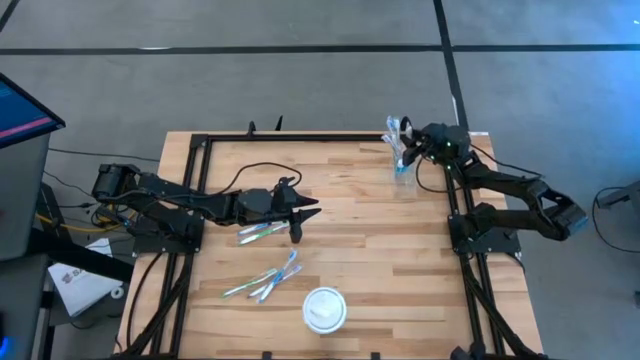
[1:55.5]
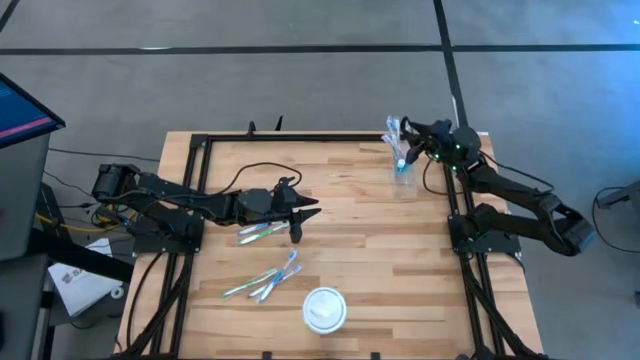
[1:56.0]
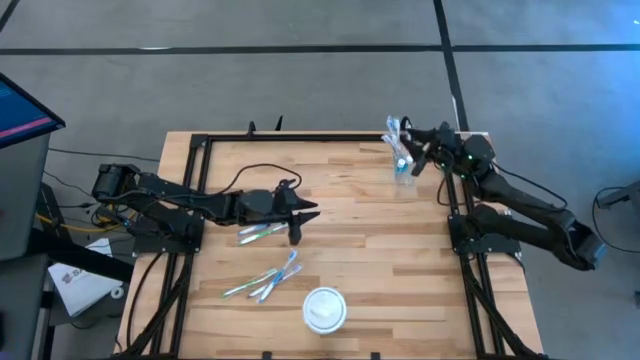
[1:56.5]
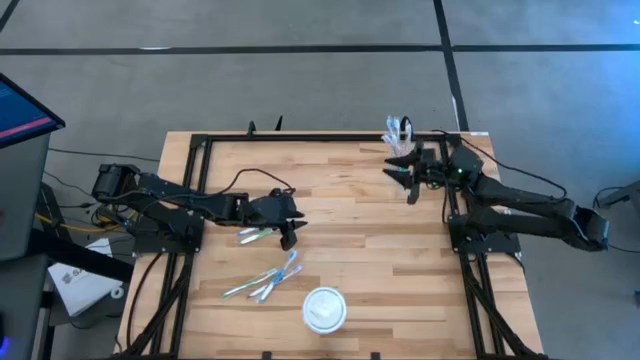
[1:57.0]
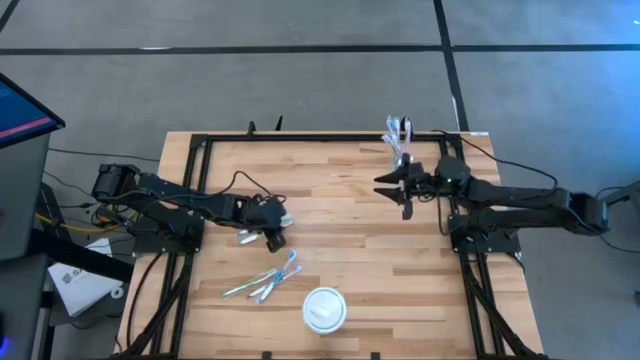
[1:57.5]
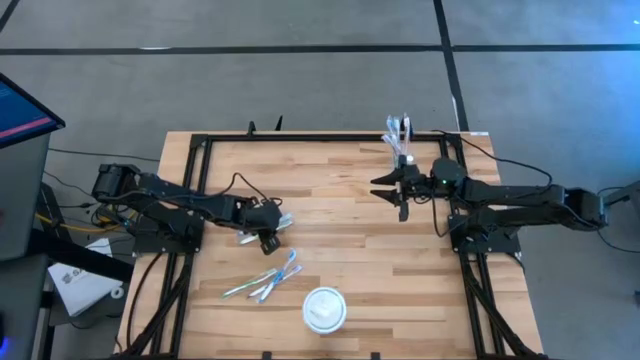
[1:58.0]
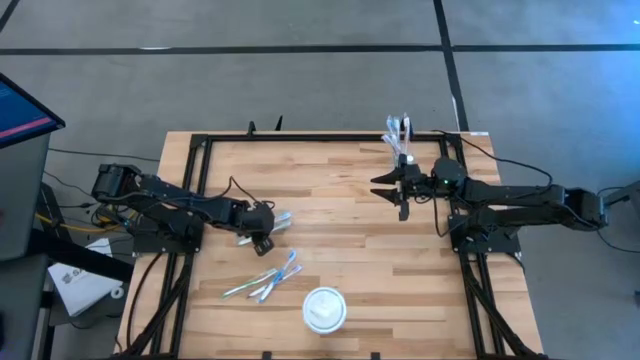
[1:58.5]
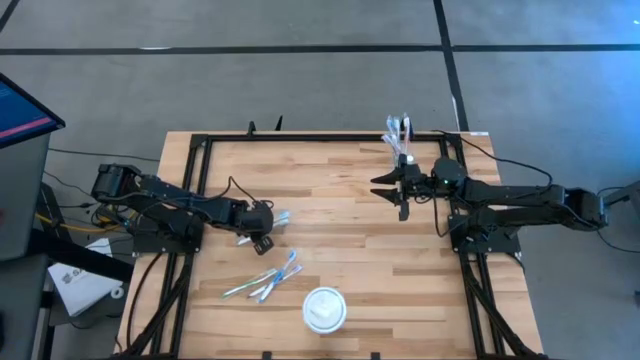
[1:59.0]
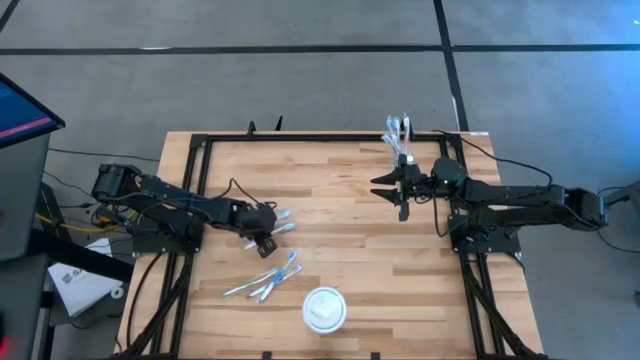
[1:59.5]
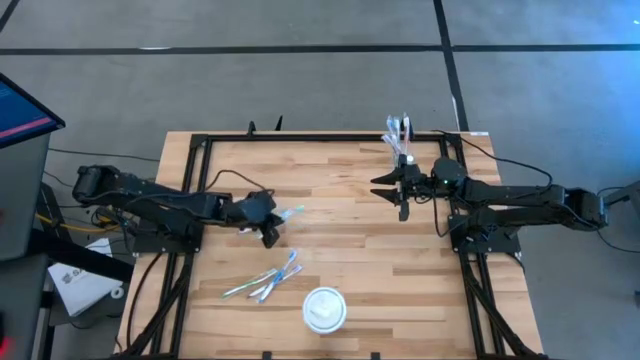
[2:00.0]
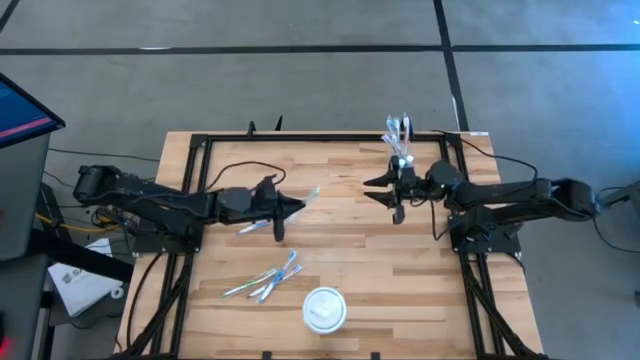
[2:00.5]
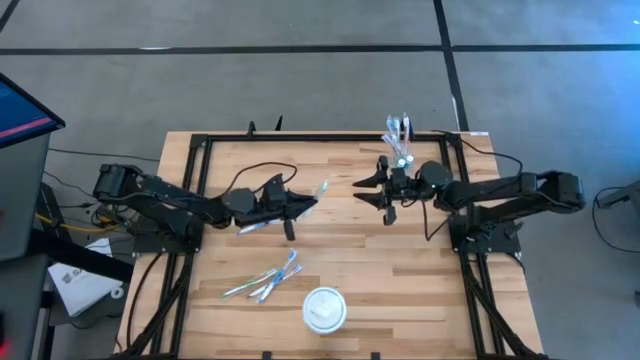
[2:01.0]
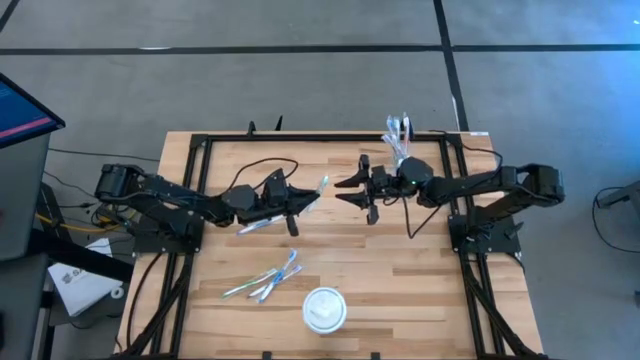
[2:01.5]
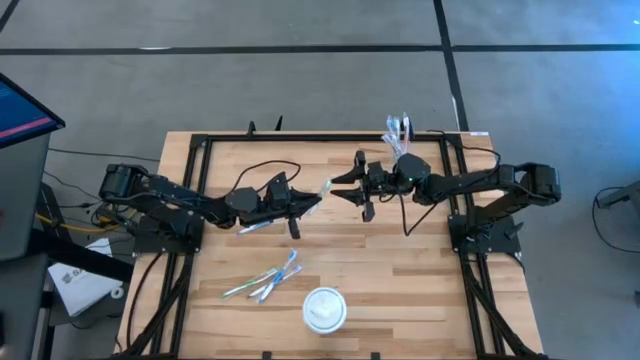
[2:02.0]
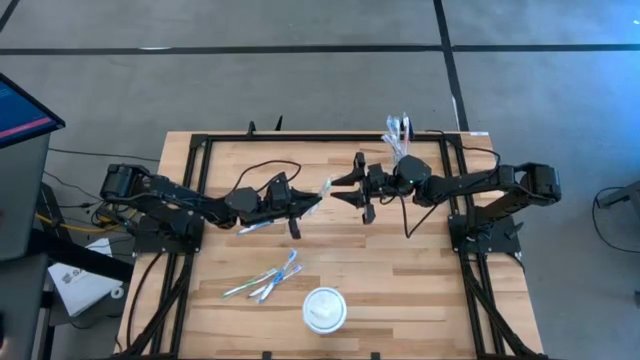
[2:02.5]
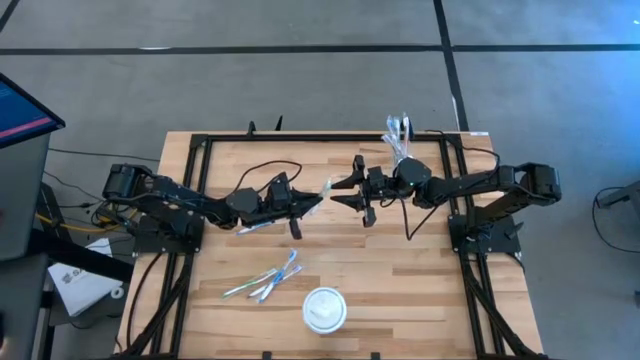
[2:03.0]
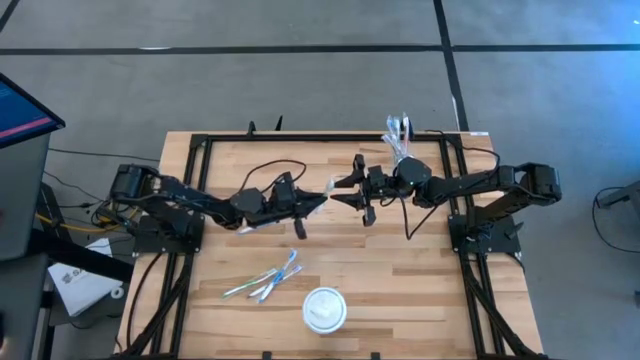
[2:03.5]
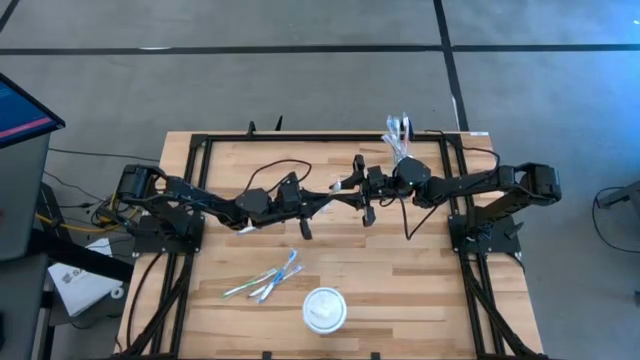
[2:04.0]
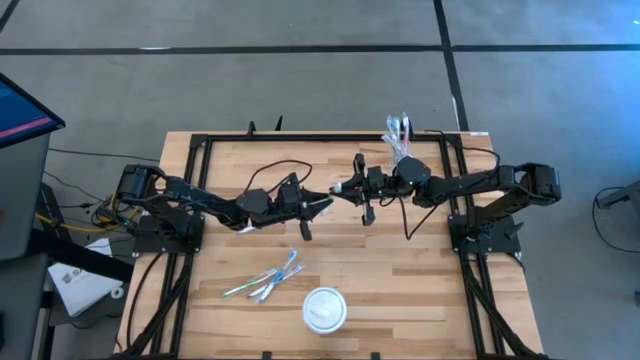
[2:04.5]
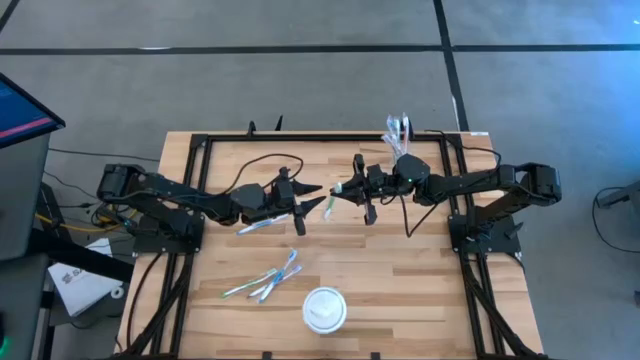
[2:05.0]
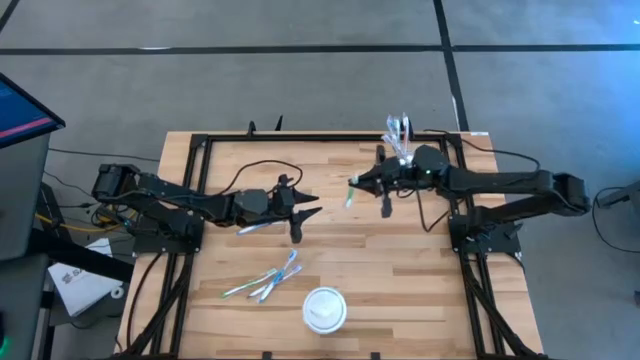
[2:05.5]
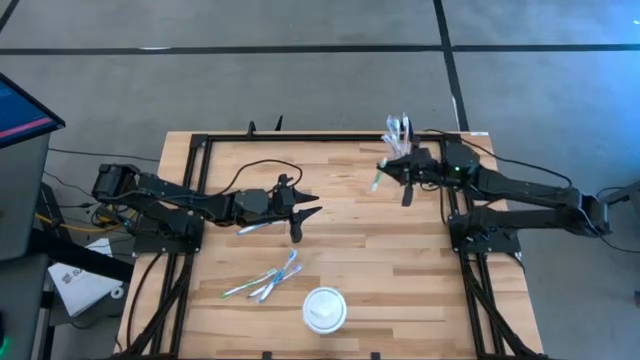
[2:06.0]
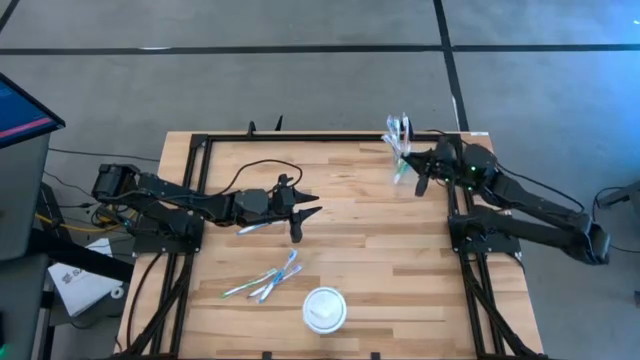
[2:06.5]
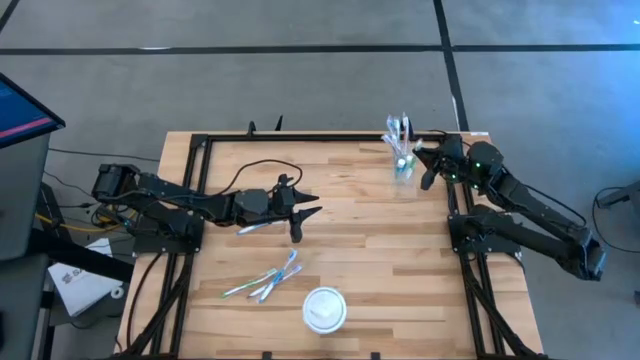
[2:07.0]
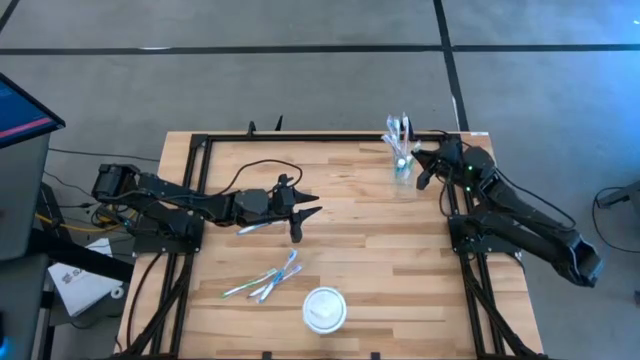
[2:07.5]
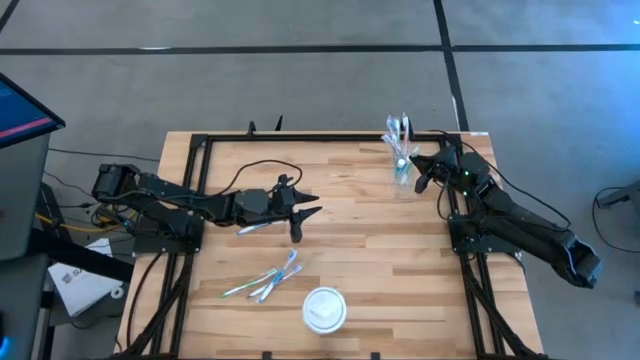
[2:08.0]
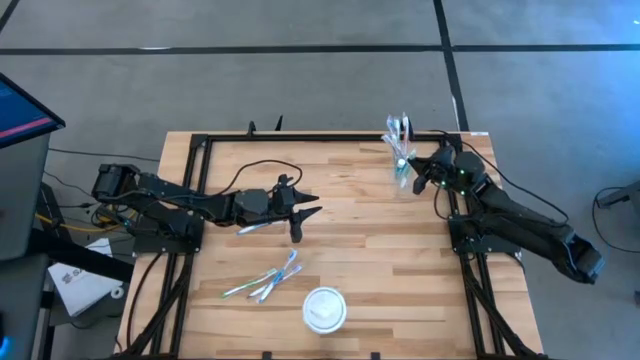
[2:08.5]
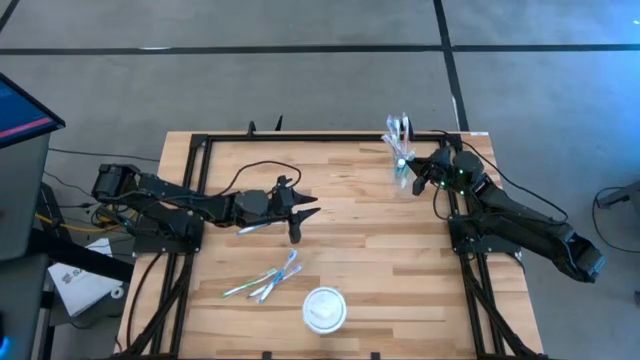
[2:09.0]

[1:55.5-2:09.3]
Task: Pick & Place toothbrushing station
Put the green toothbrush into the transparent organizer

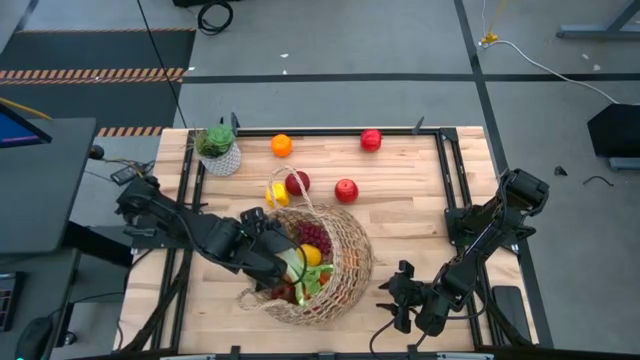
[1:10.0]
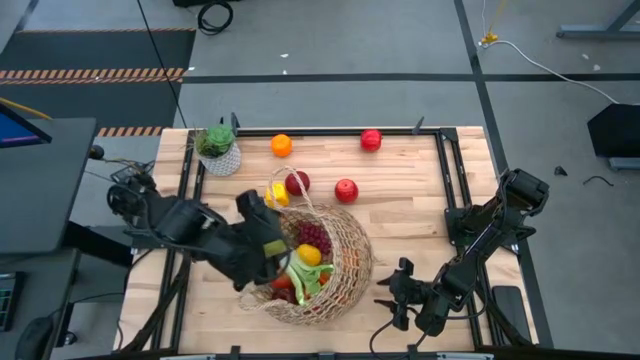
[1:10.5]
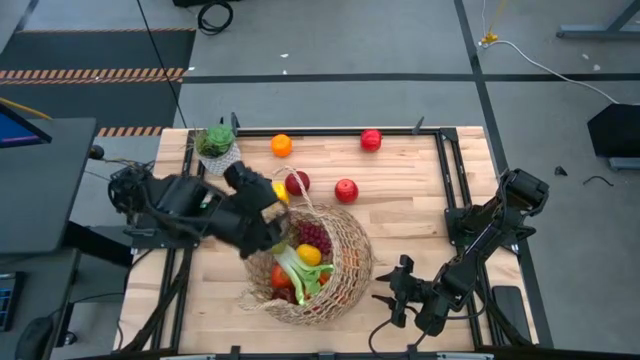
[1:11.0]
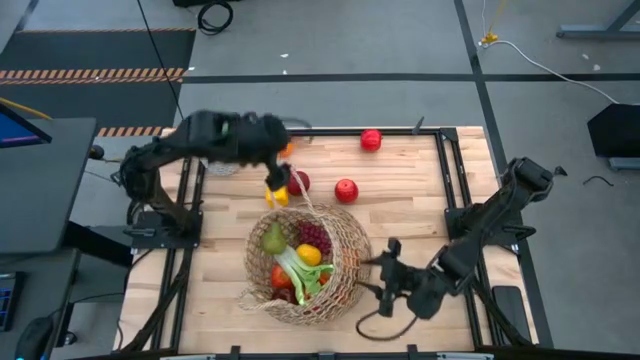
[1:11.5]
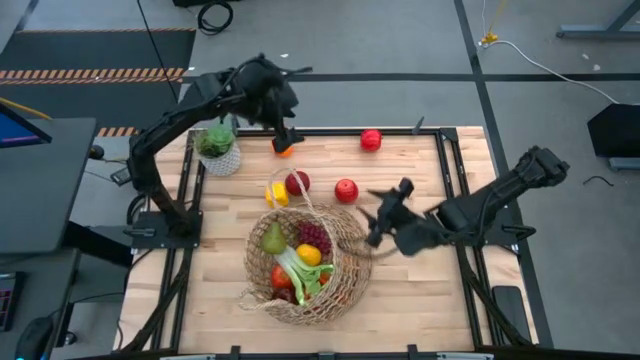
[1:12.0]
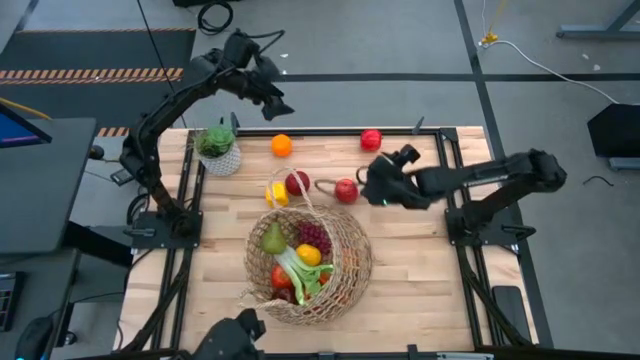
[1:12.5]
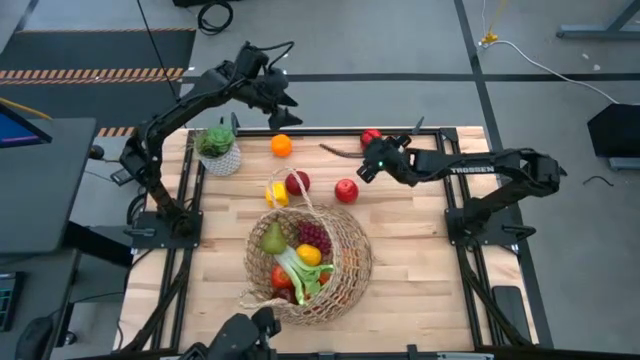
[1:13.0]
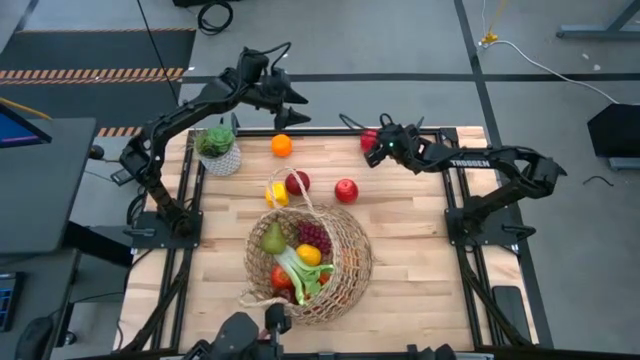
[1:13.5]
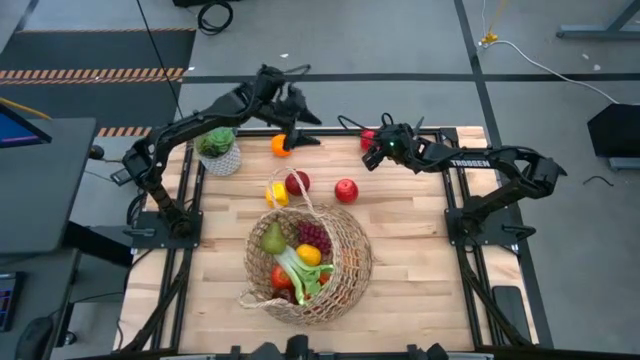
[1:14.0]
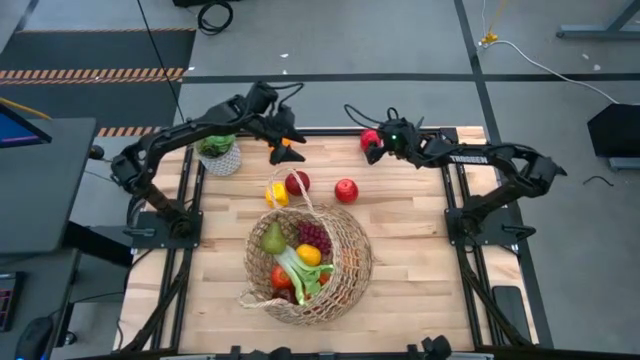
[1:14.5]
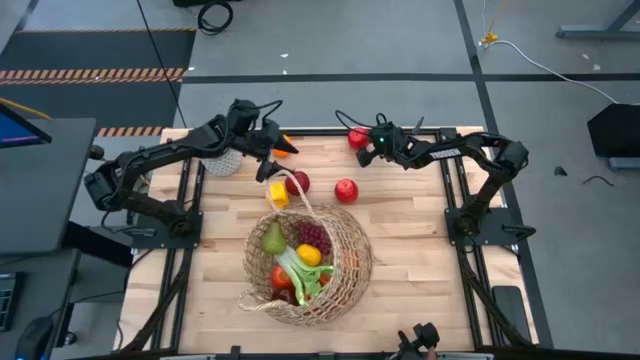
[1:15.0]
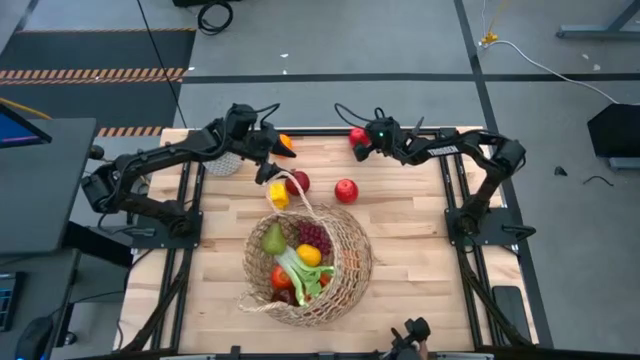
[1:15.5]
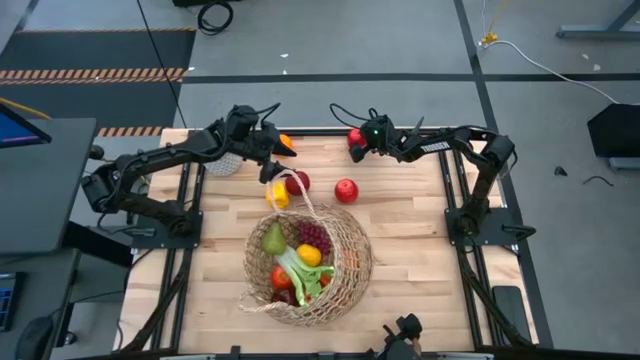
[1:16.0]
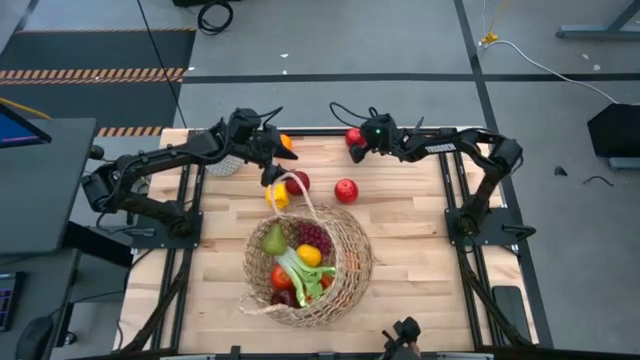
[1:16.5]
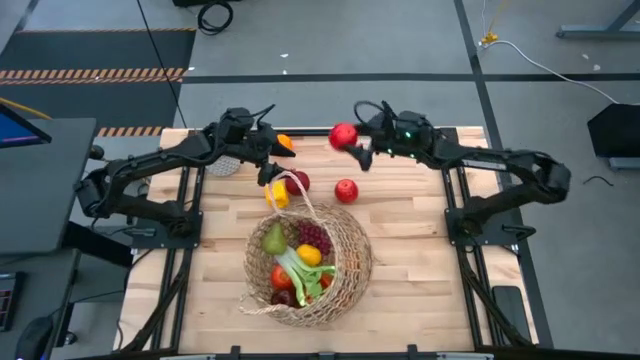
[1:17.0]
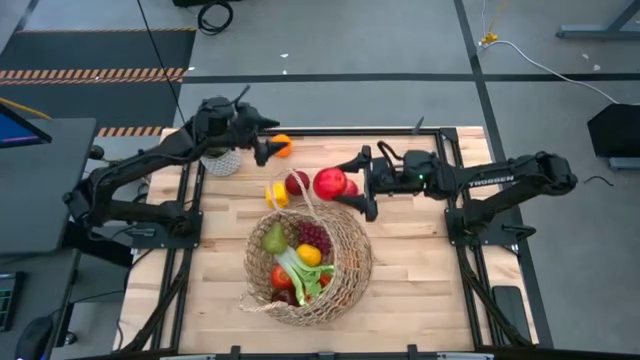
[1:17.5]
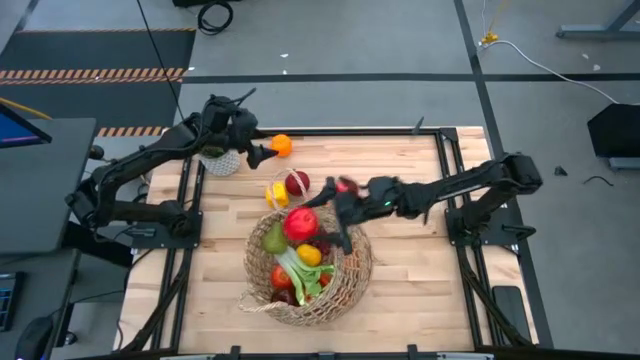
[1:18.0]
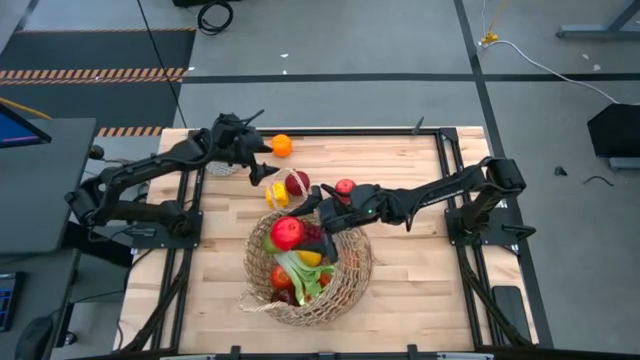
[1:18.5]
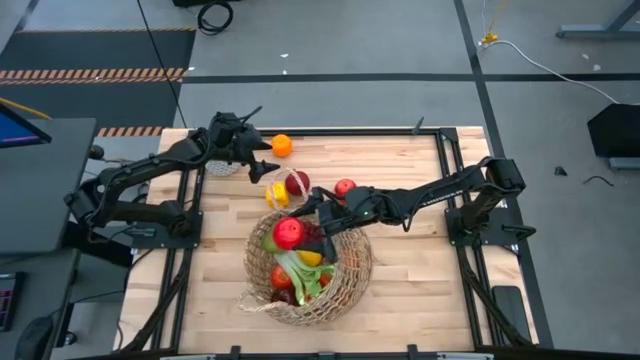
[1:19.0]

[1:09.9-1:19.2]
Task: Build produce basket
Put the apple into the basket
